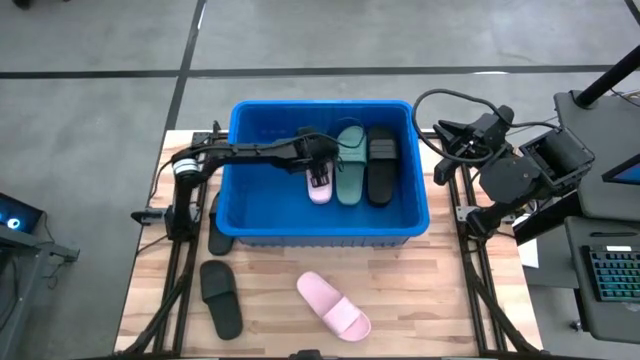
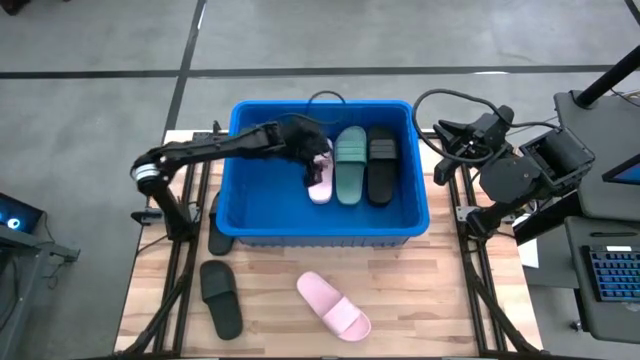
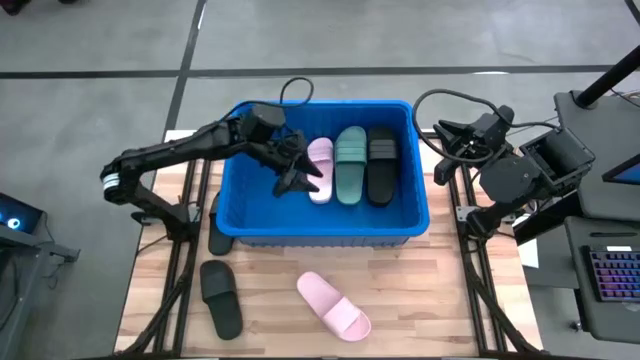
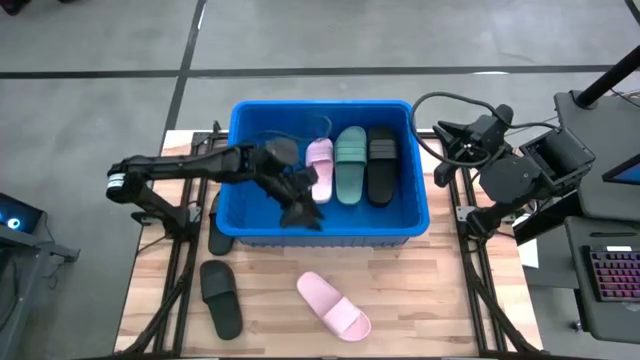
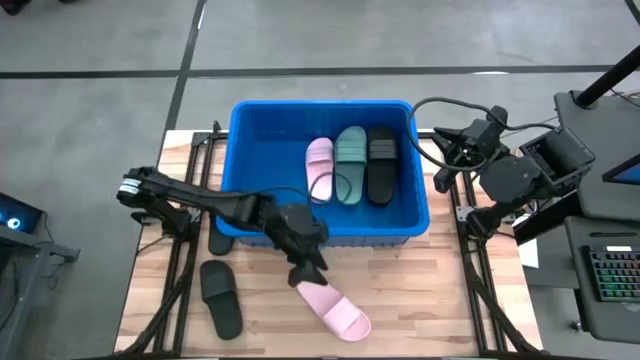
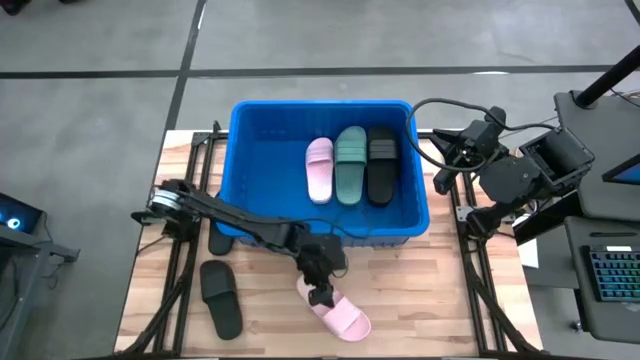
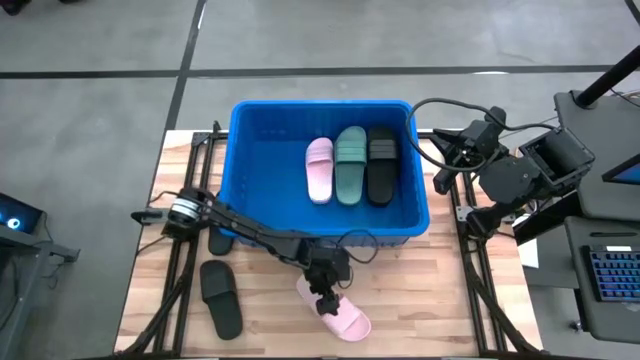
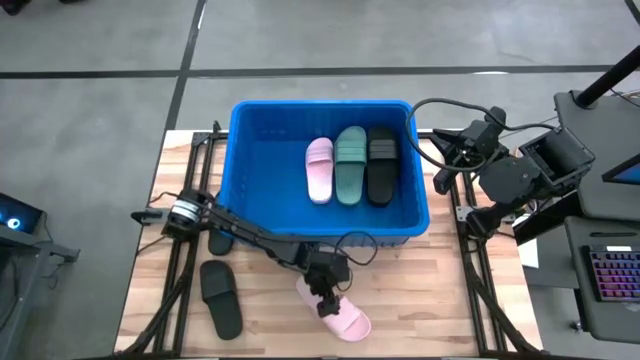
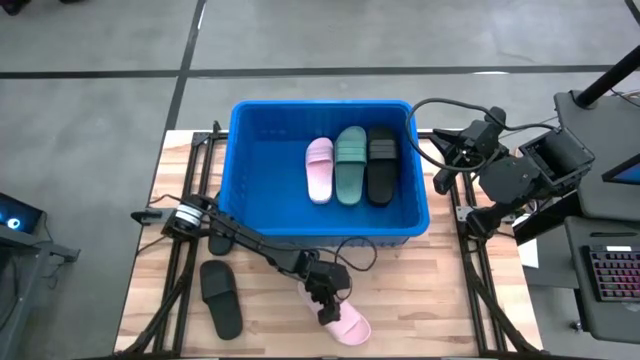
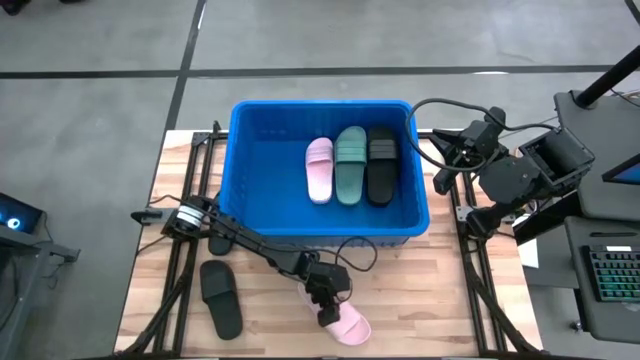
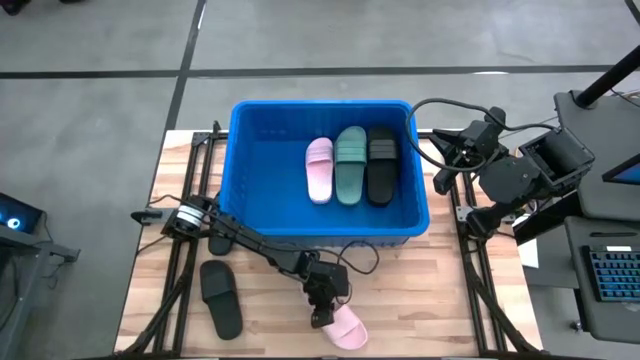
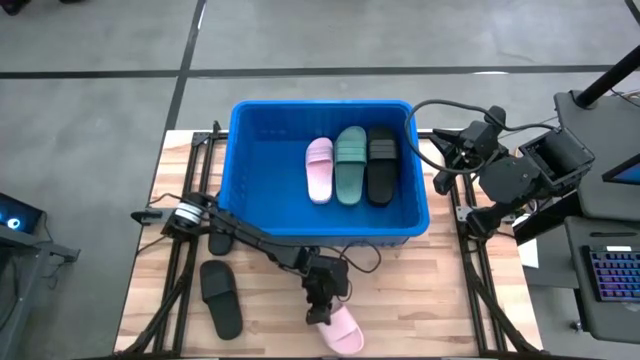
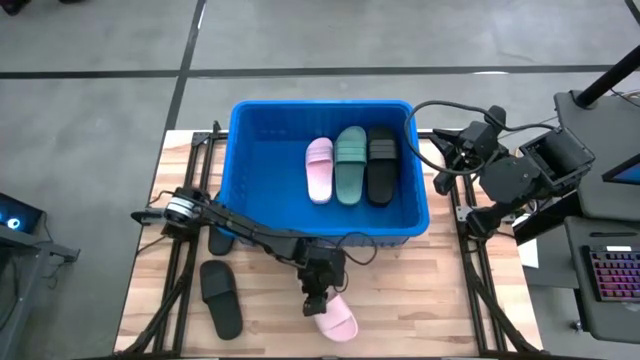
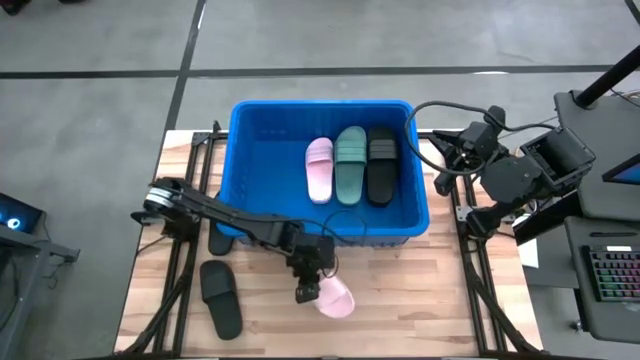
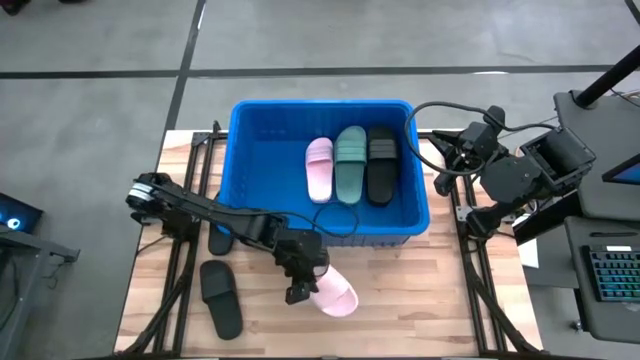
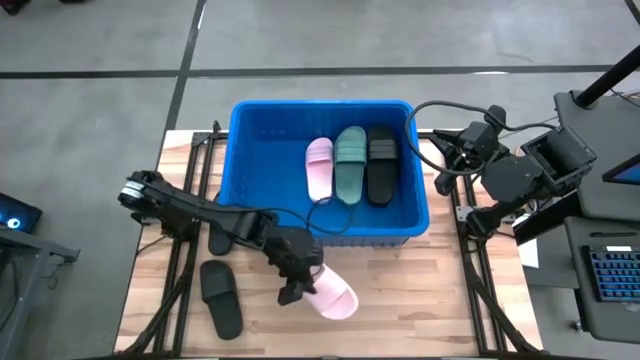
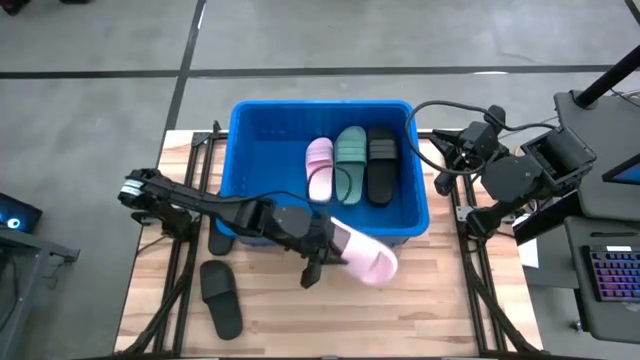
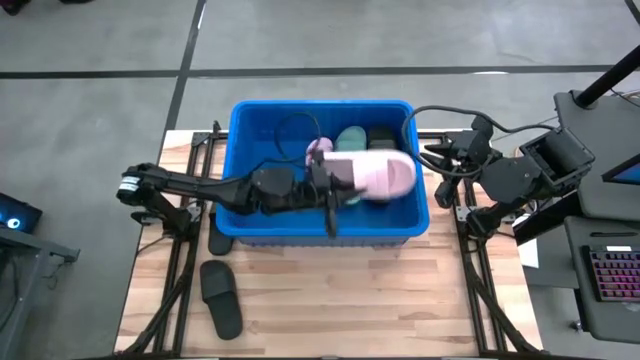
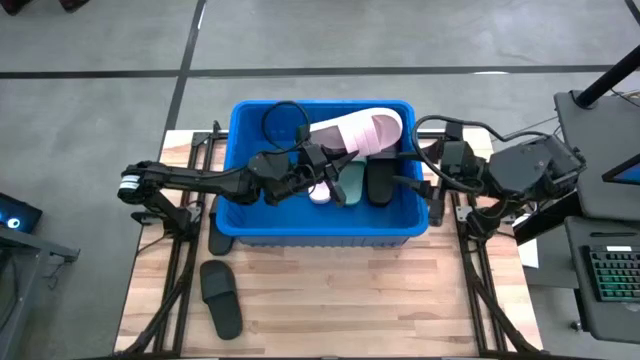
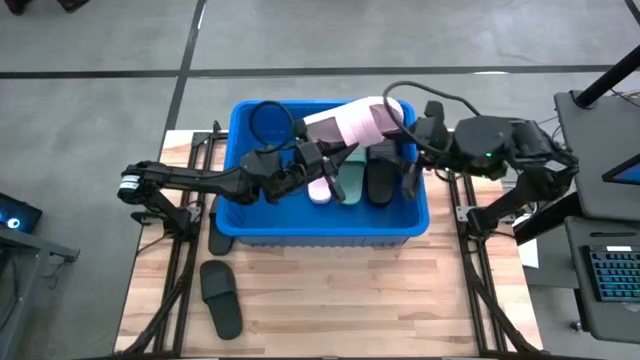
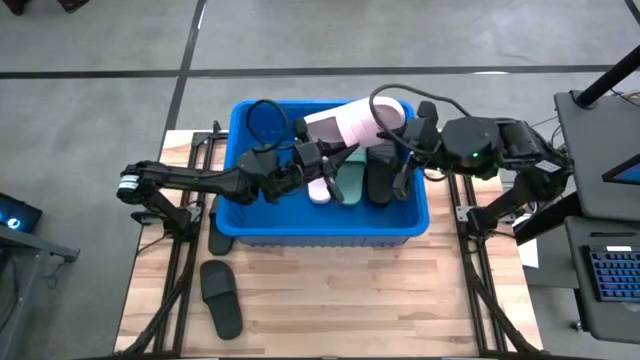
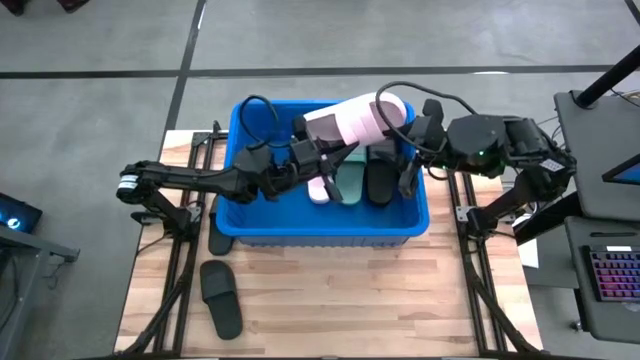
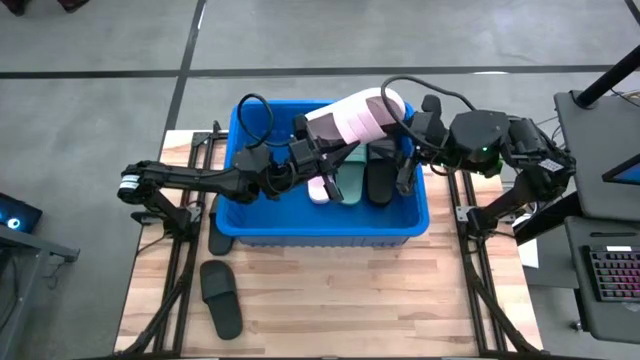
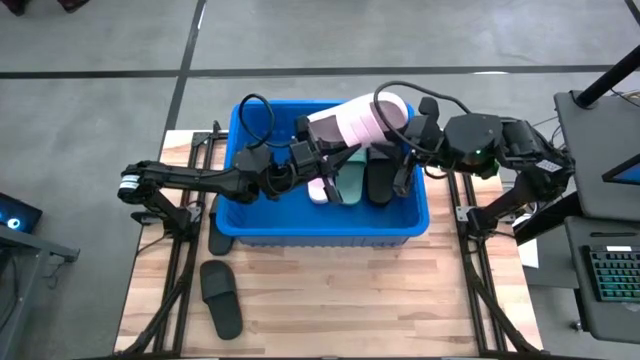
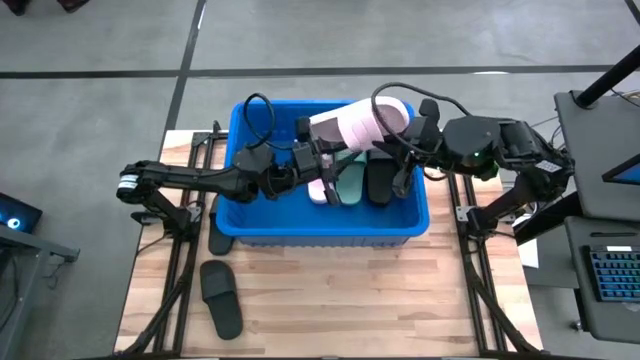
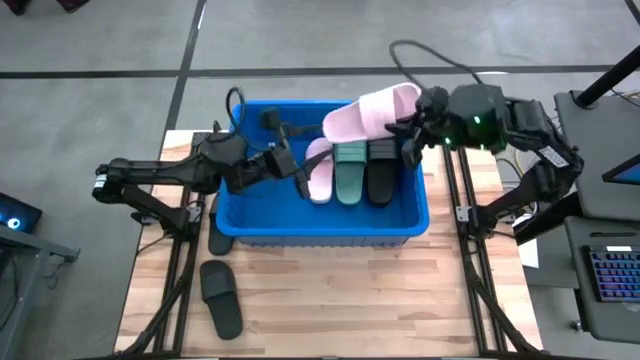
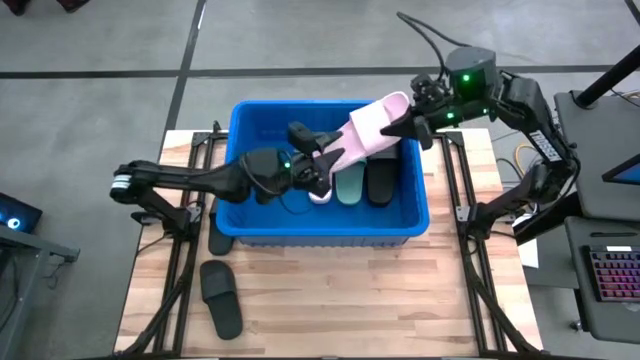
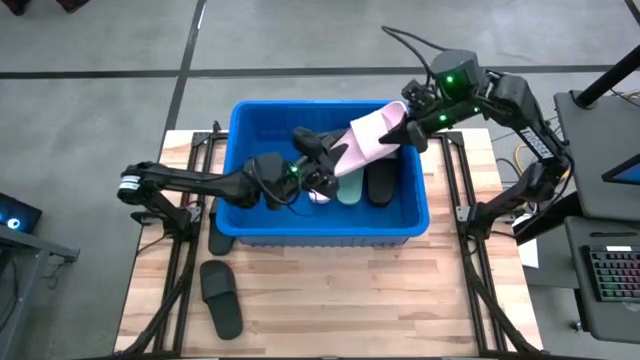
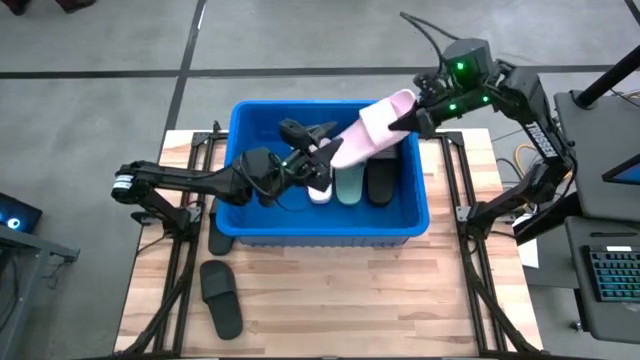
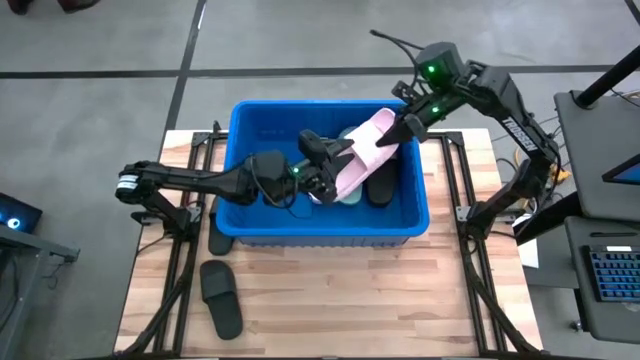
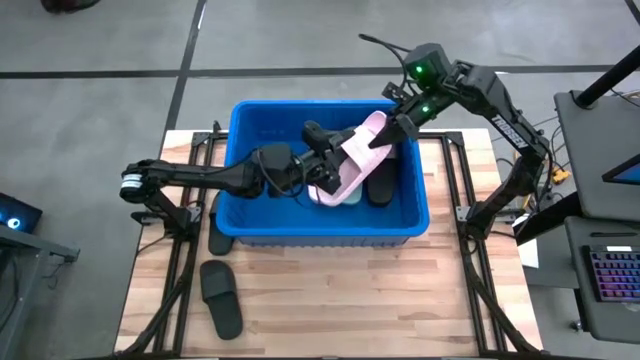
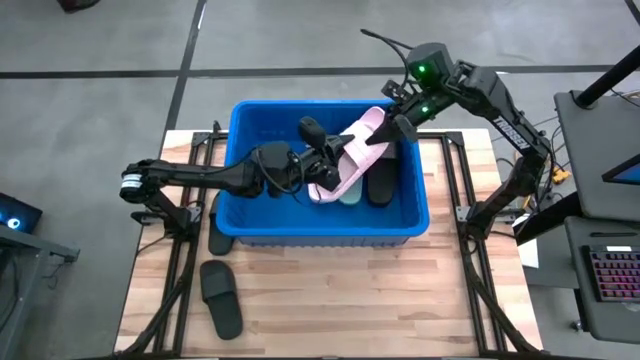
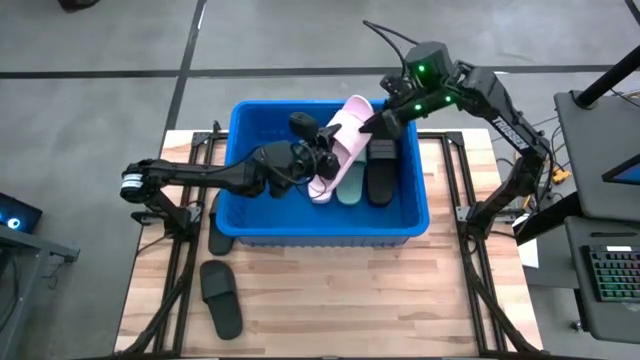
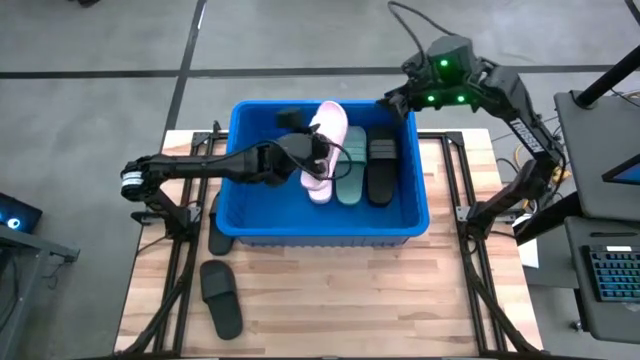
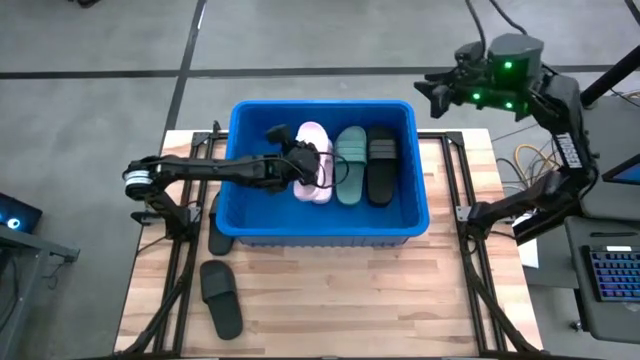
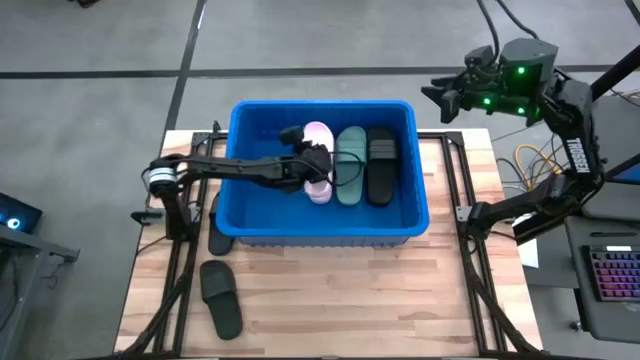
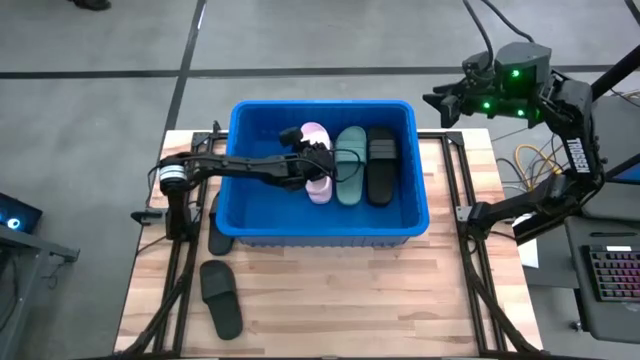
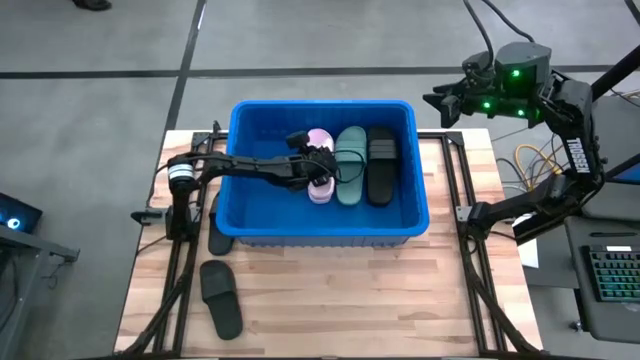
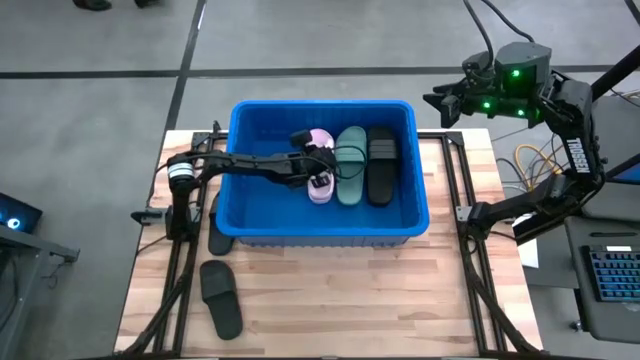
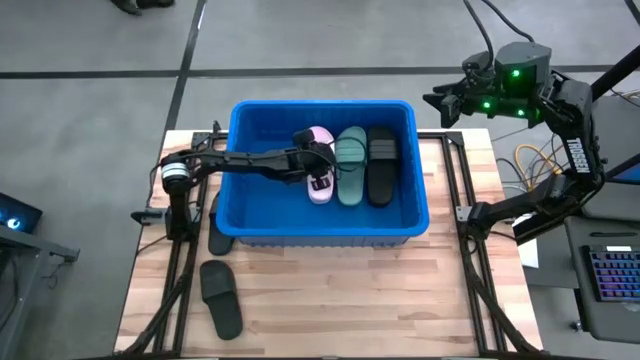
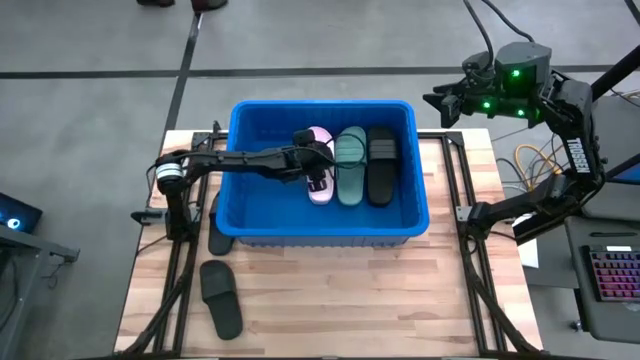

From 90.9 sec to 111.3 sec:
Task: Pick and place slides into bin
Put the pink slide into the blue bin

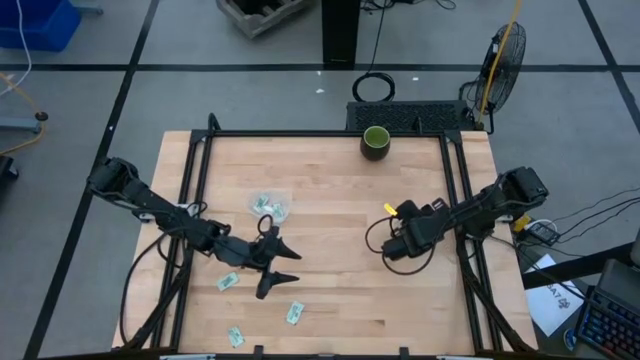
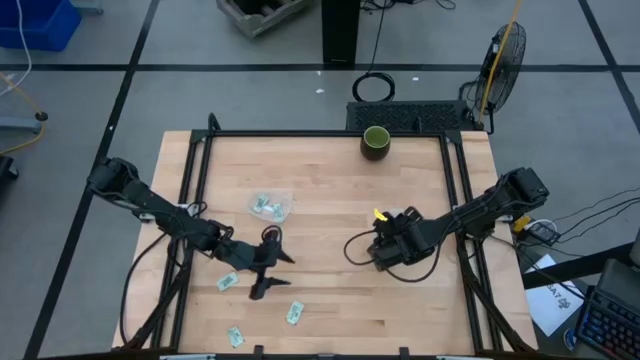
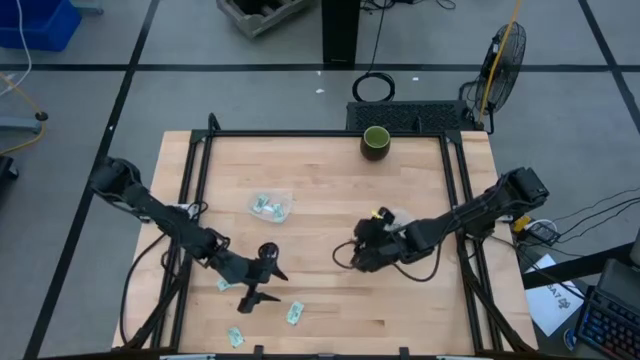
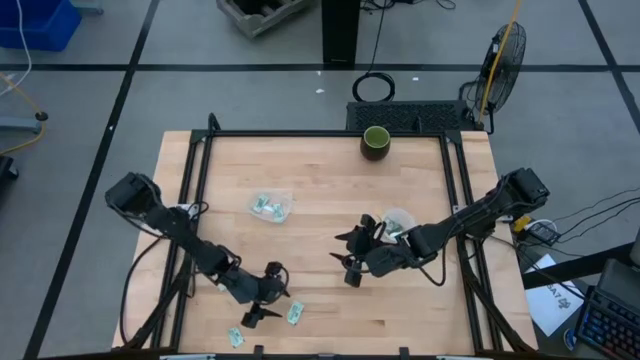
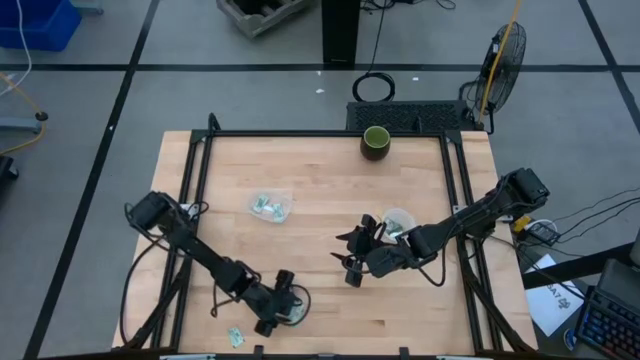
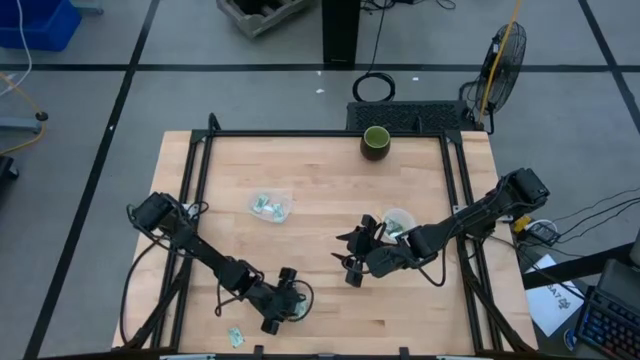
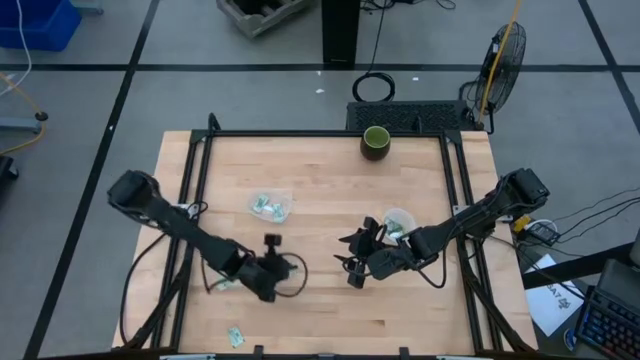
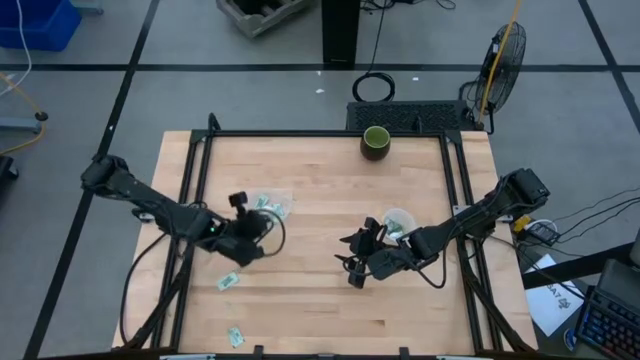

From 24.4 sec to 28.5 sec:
Task: Pick and place Stevia / Truvia into bins
Put the white stevia packet into the transparent circular container
